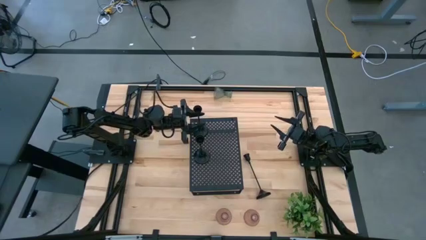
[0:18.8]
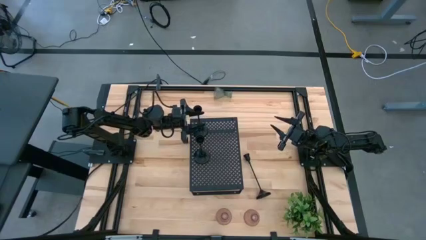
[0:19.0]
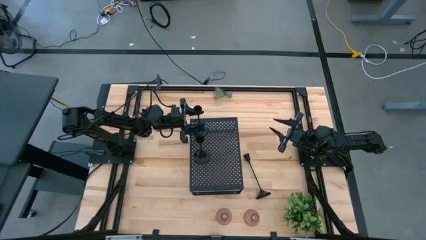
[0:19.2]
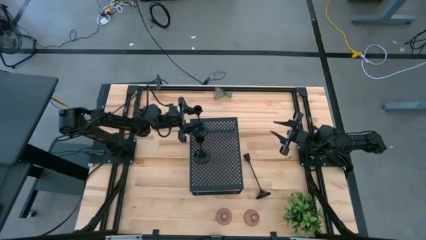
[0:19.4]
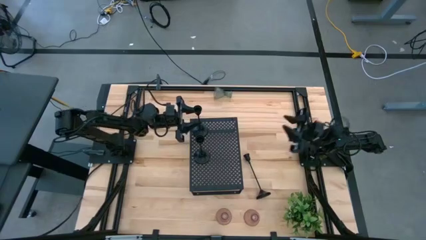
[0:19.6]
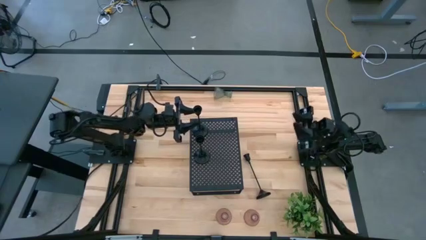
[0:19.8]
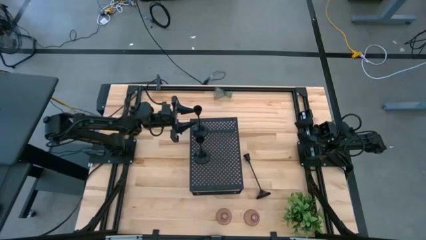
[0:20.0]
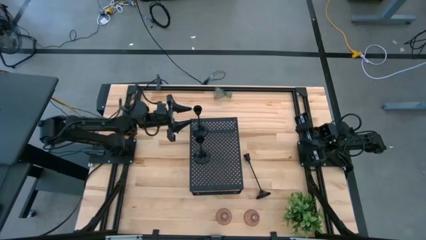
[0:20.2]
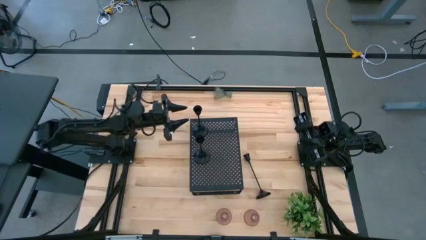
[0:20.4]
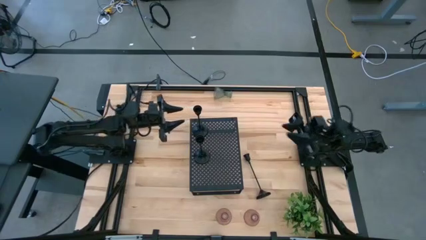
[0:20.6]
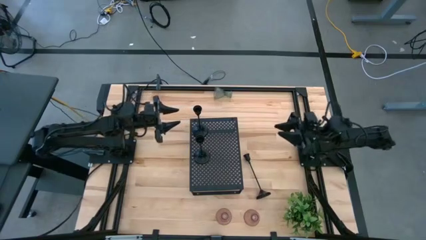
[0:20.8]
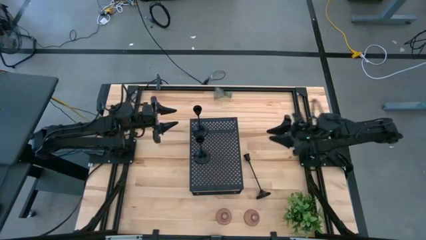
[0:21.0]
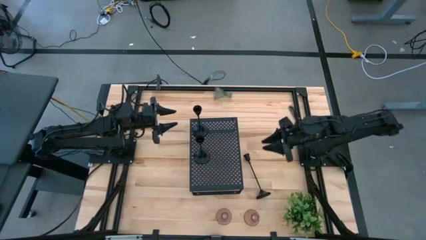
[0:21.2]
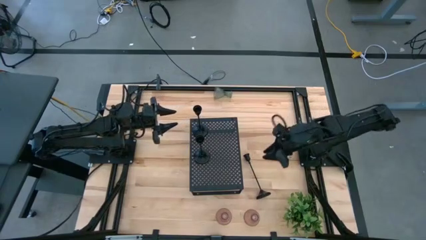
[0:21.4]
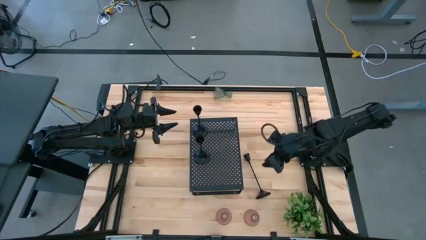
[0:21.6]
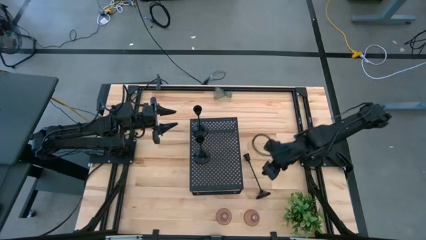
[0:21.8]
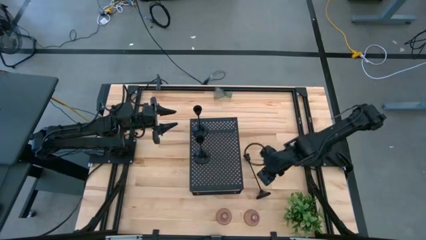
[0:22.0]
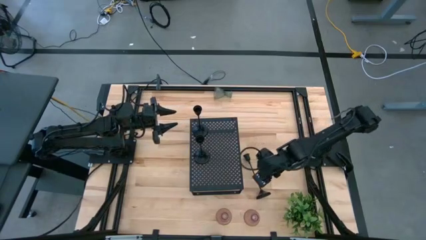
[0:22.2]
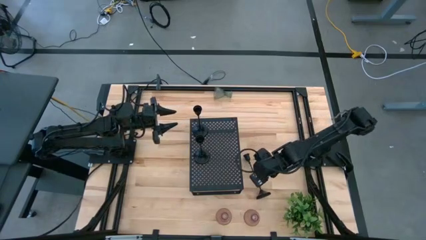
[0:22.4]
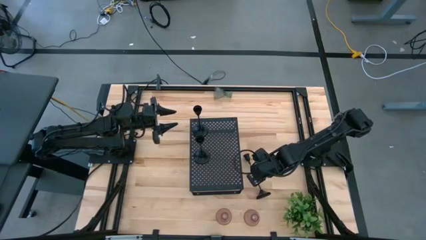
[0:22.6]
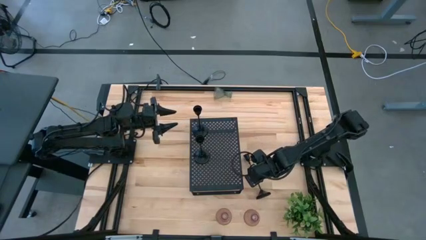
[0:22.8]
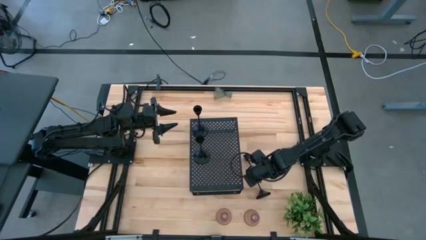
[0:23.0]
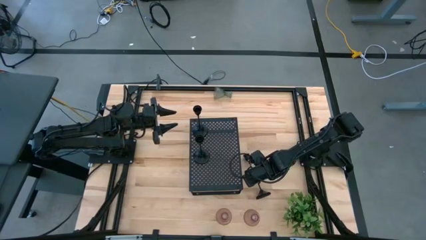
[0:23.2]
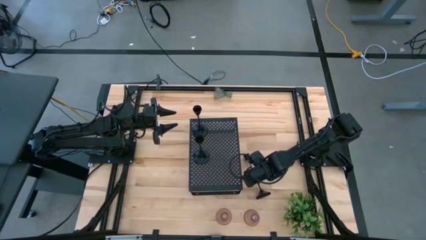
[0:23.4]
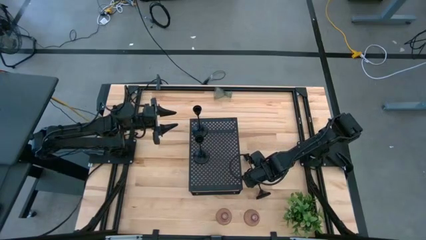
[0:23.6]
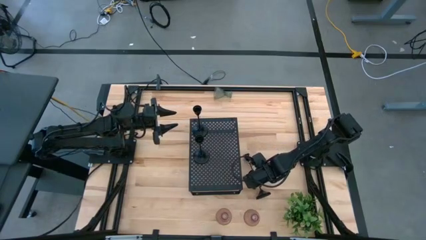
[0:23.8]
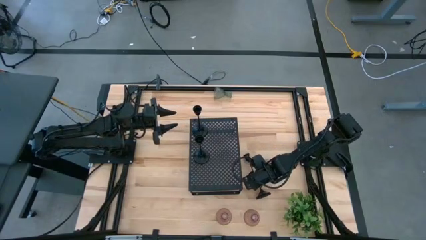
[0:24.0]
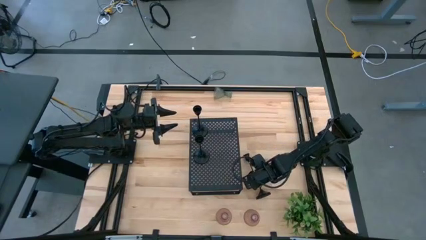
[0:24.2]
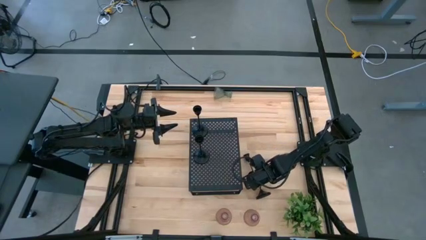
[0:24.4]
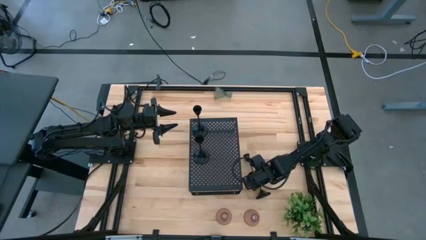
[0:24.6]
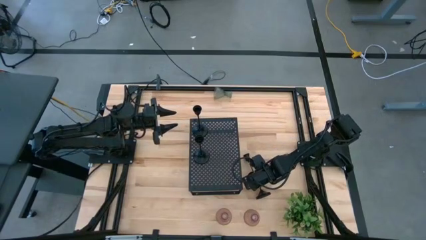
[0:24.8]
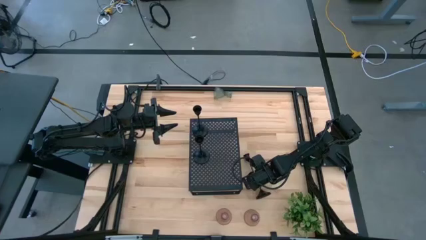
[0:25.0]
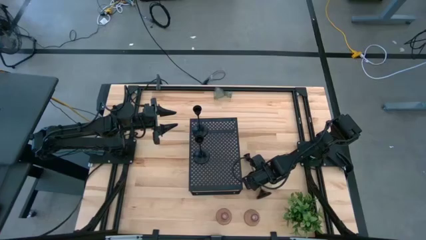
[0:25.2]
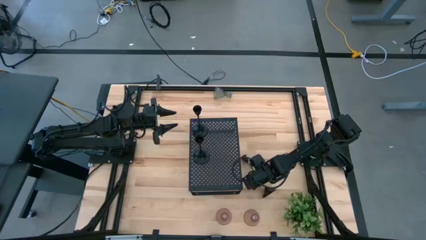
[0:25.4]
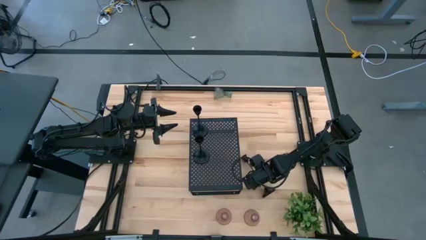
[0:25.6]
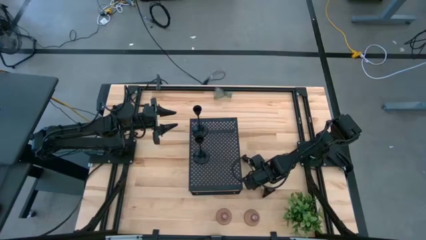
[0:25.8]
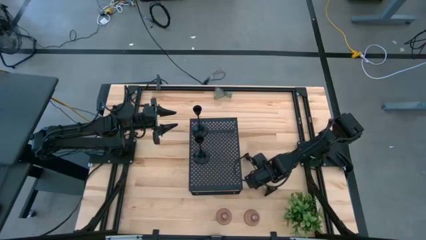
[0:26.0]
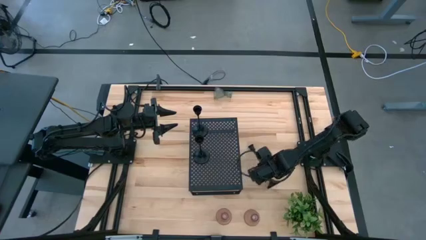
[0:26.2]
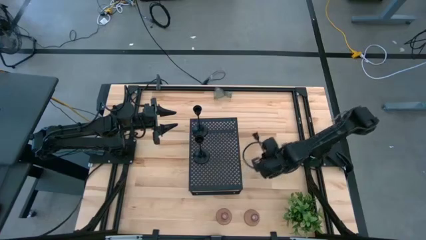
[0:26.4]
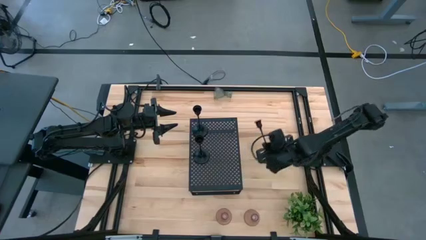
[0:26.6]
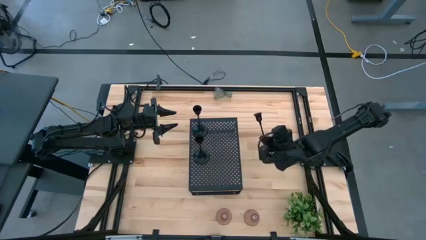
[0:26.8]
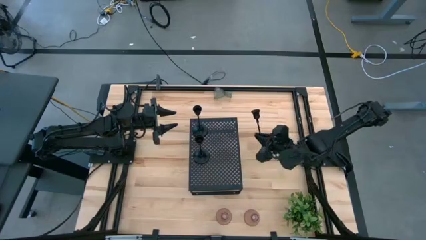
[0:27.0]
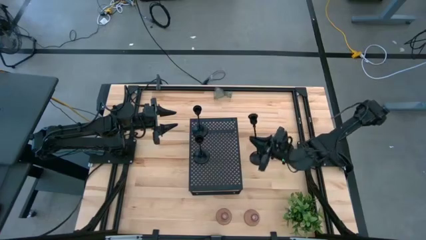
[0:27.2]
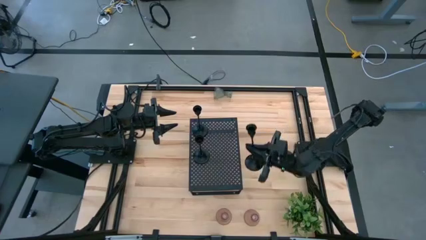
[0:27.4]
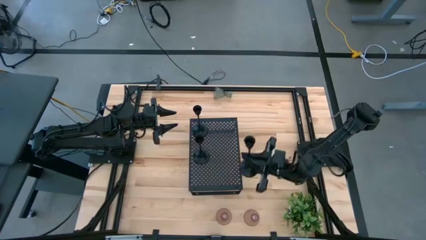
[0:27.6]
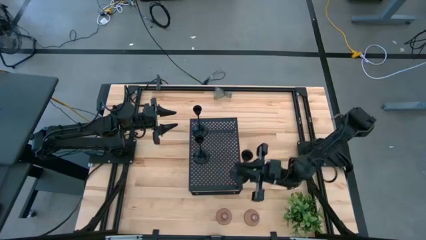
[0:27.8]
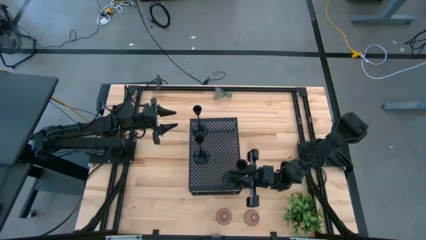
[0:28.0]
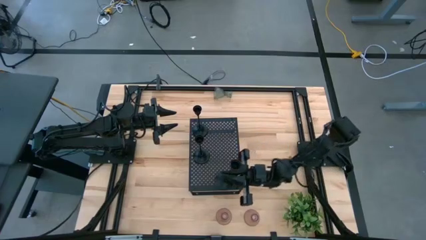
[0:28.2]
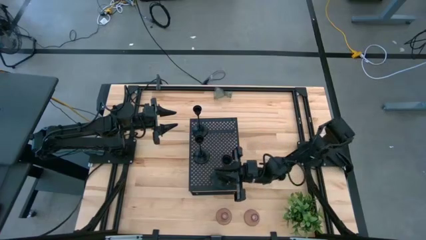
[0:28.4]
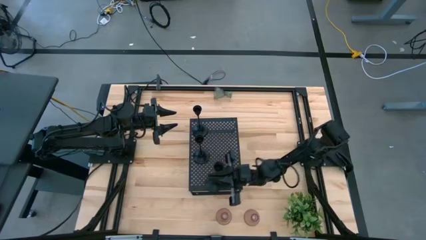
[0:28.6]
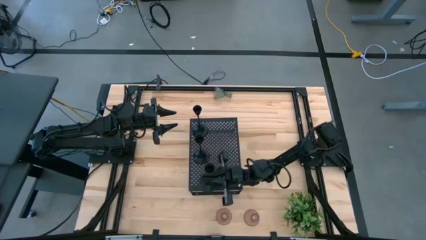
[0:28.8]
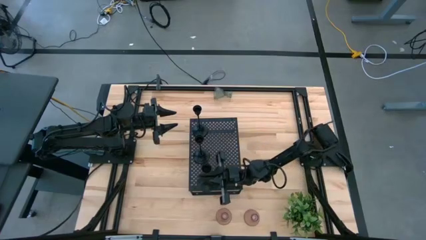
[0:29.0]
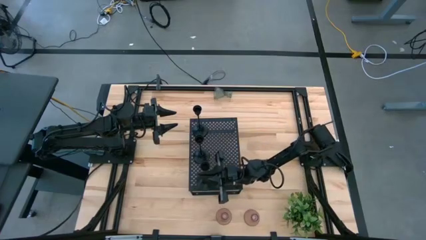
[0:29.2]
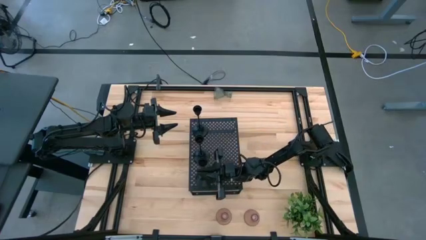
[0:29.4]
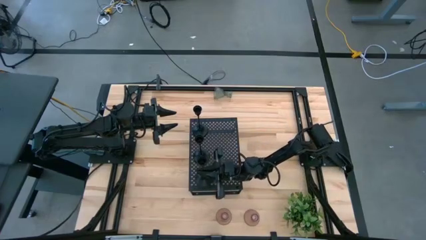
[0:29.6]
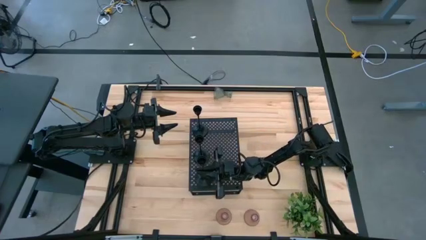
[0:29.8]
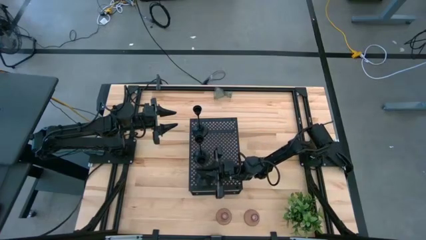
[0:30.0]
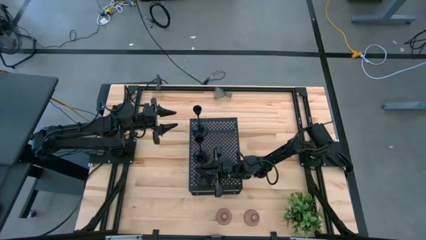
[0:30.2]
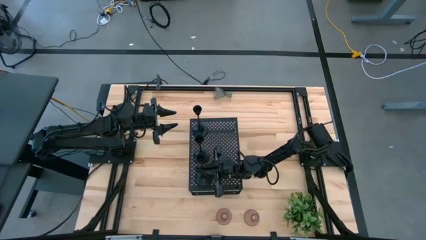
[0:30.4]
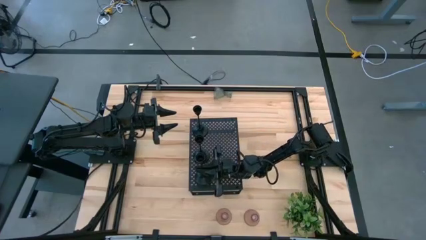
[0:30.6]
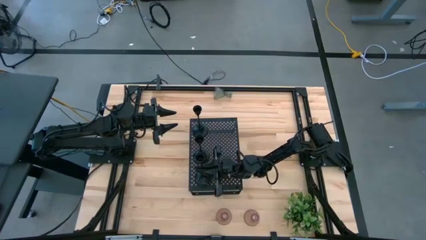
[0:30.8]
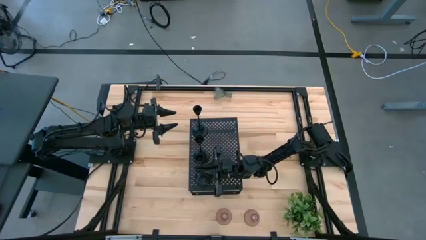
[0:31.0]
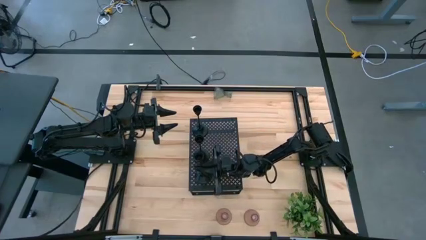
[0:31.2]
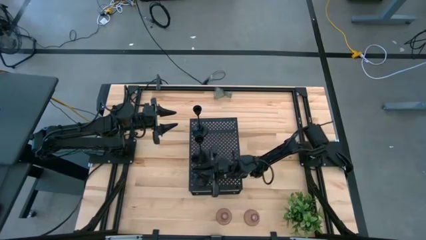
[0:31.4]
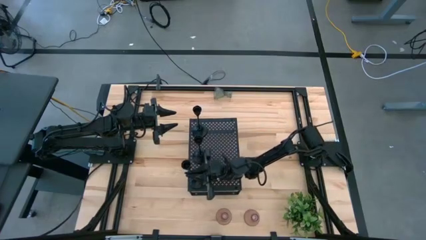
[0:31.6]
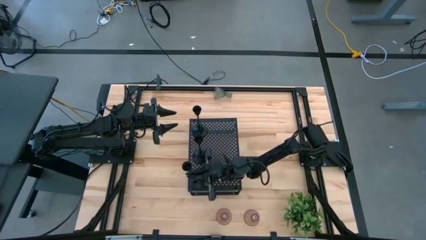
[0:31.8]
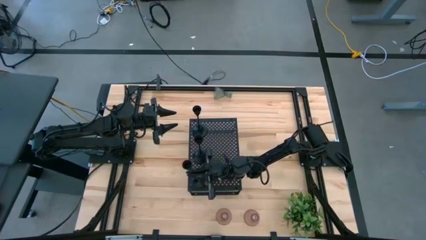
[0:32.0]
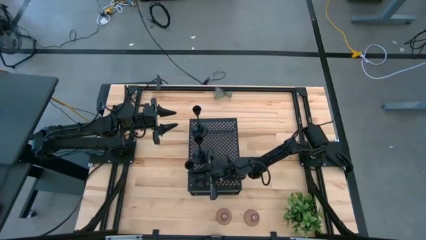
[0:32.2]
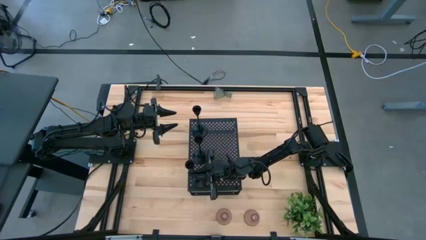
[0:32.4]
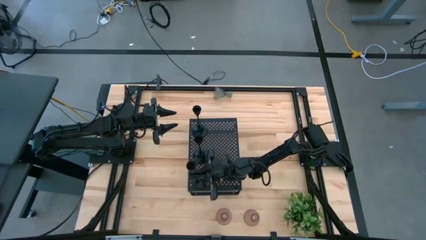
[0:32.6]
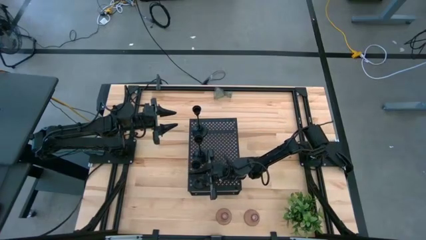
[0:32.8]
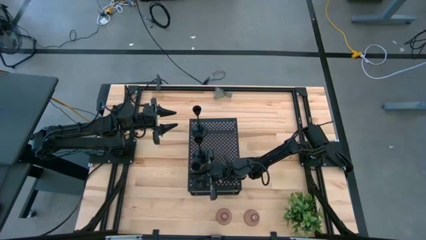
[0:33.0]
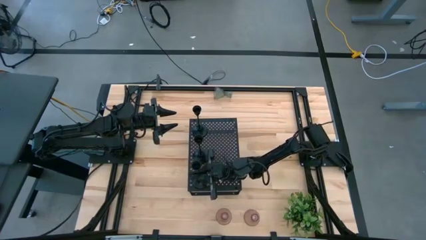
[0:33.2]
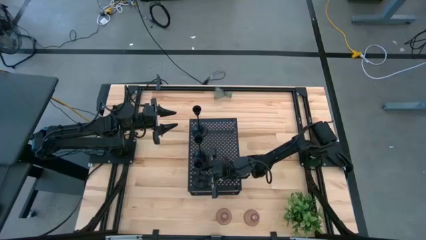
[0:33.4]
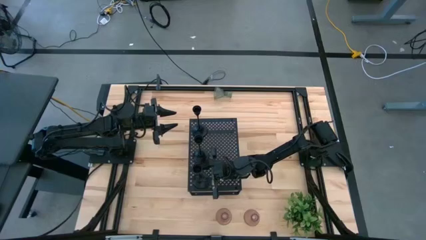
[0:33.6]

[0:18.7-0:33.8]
Task: Pick & Place candle stick holders
Put the black candle holder on the shelf
